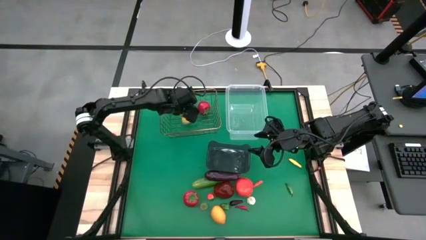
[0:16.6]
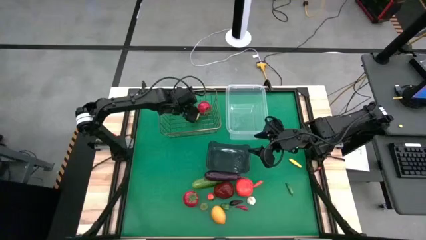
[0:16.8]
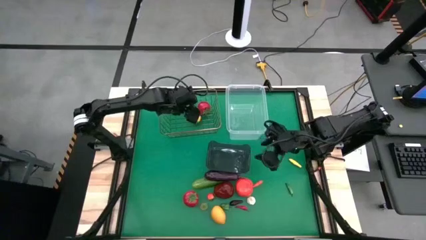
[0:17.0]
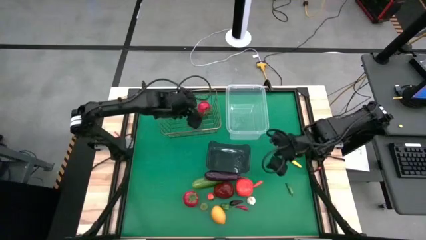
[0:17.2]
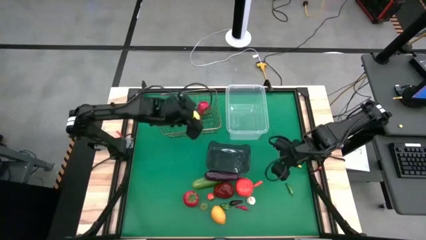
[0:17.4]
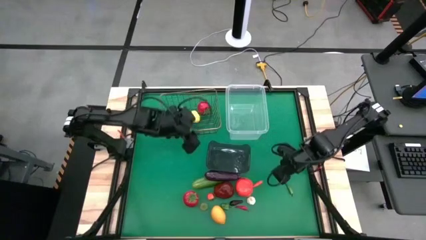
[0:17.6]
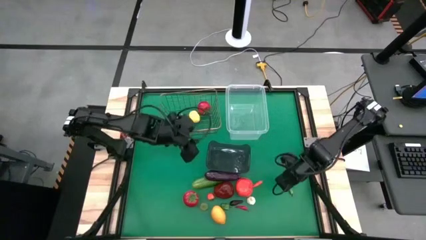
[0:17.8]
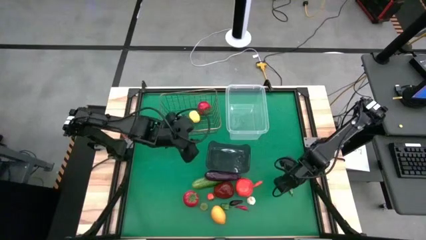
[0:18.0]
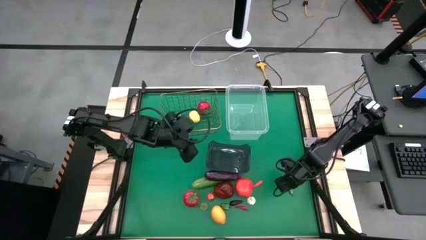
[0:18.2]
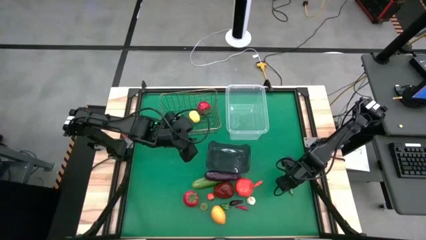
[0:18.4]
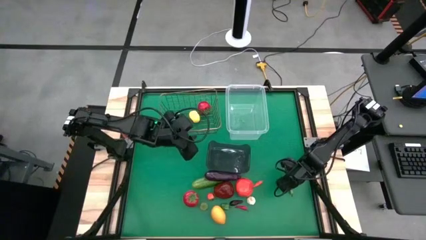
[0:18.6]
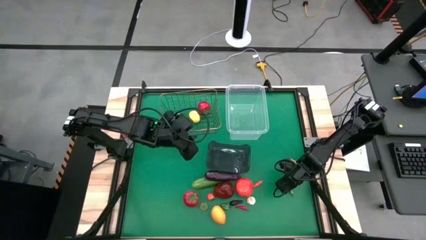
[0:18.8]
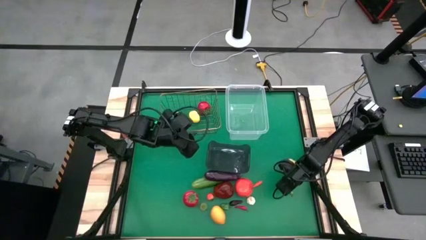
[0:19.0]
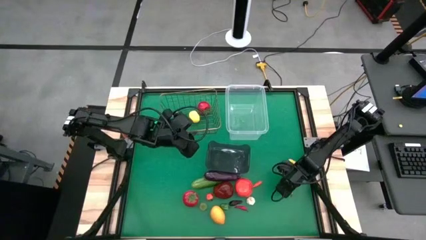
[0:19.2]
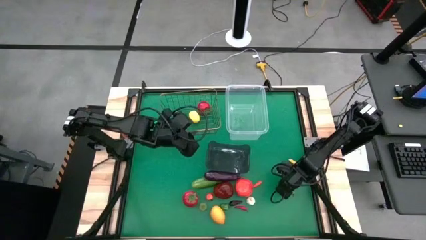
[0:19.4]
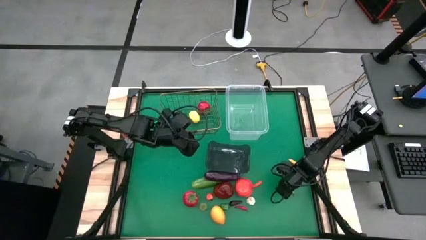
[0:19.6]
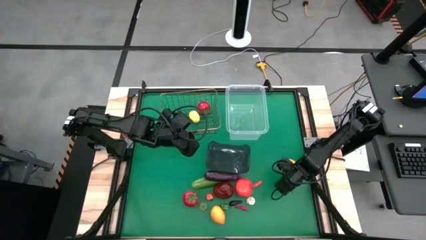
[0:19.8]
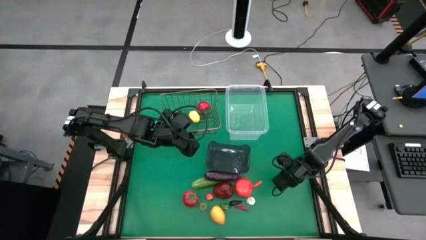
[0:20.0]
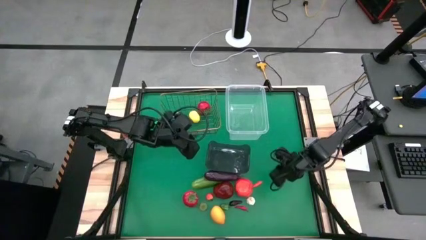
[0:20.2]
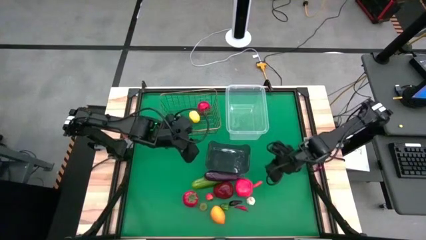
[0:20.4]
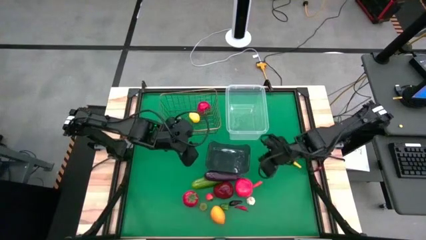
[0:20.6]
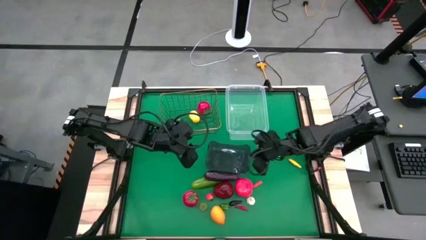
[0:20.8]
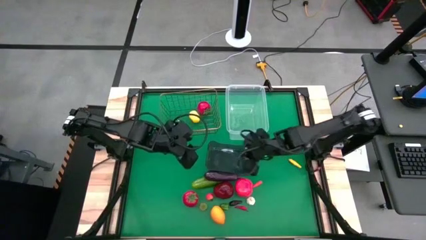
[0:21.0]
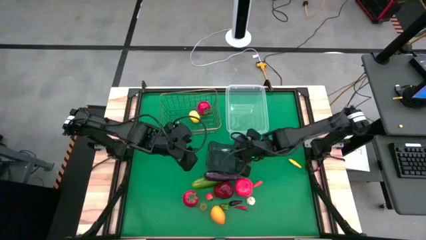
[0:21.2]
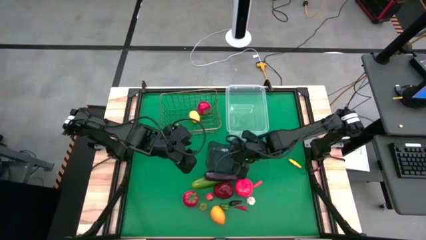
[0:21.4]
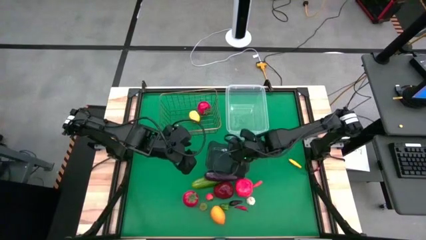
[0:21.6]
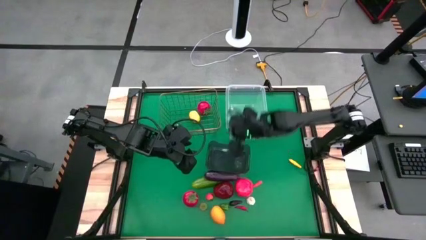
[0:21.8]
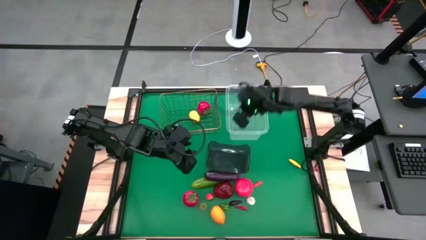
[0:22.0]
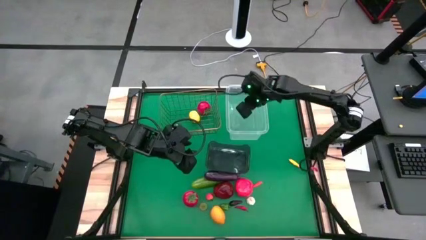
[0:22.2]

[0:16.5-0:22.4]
Task: Sort produce into baskets
Put the green chili pepper into the transparent bin

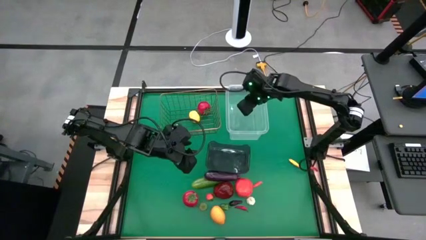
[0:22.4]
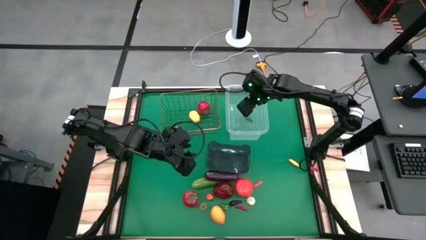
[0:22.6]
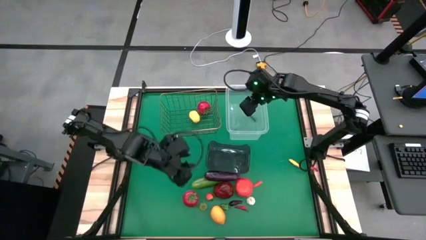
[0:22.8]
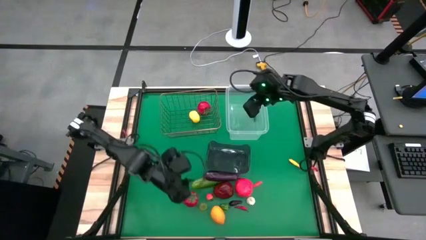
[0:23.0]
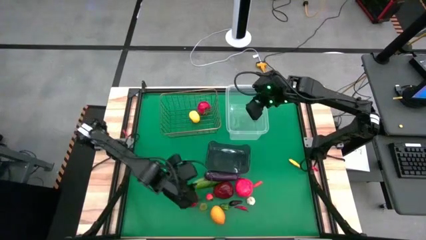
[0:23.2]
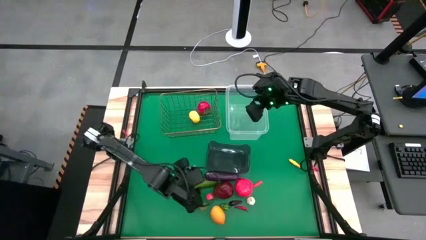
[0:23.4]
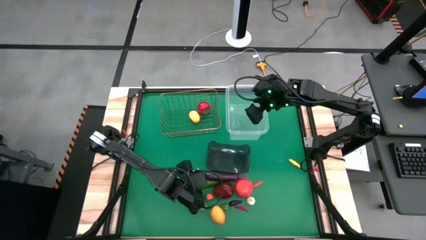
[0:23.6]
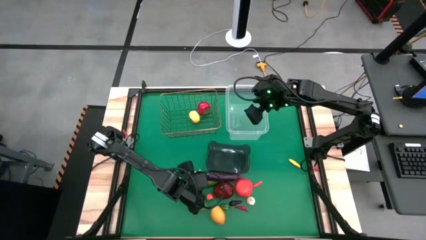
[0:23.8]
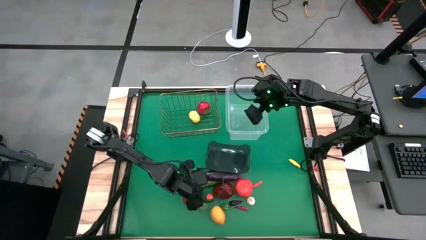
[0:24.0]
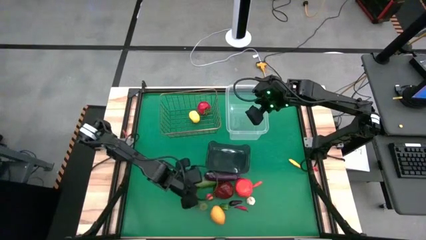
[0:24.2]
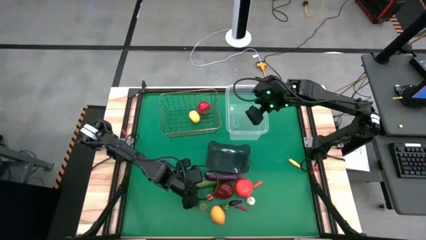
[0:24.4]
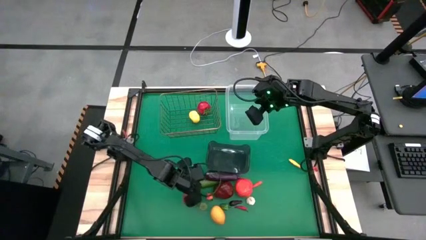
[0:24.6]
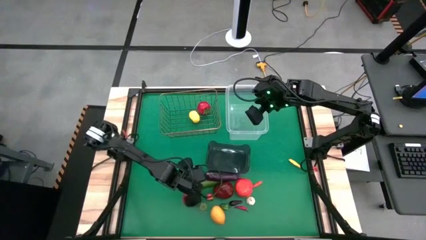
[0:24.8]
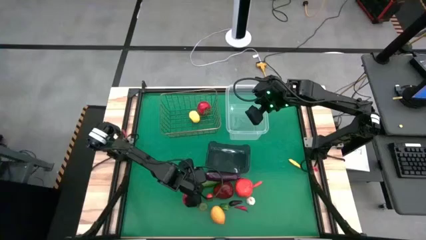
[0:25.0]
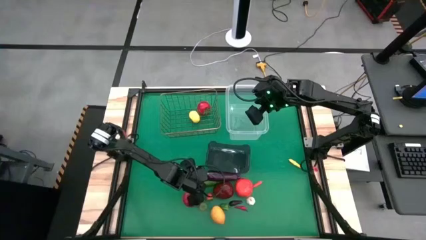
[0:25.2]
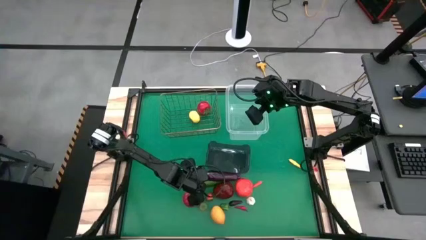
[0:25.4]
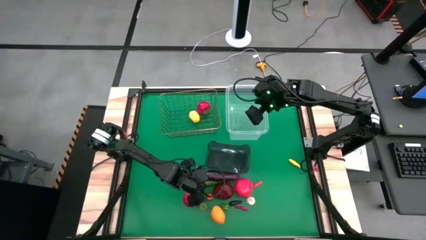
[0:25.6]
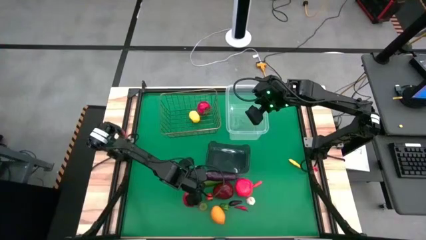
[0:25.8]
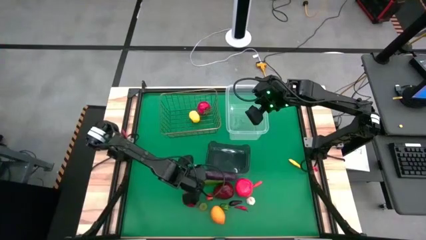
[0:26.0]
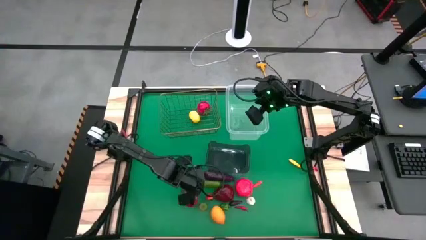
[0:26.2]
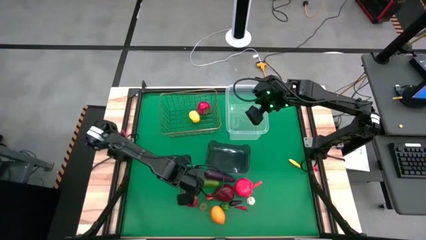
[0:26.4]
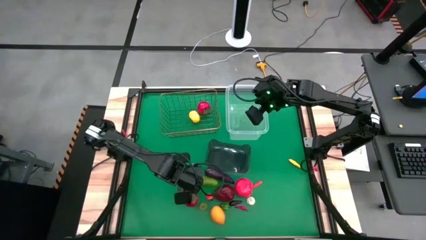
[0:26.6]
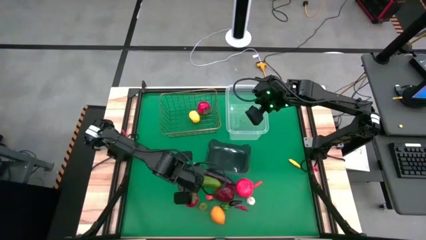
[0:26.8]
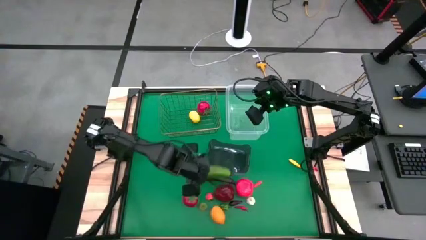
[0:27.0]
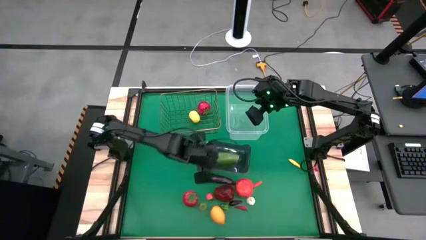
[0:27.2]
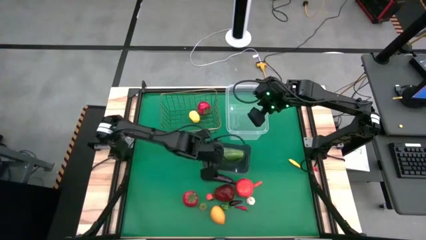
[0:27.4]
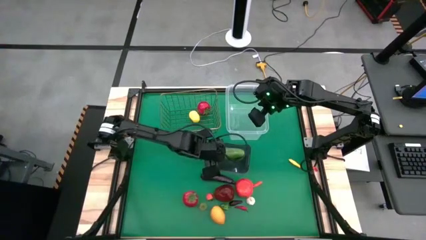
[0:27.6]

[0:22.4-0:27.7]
Put the cucumber into the black bin

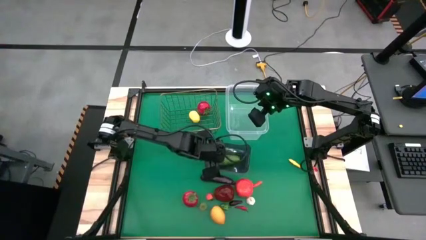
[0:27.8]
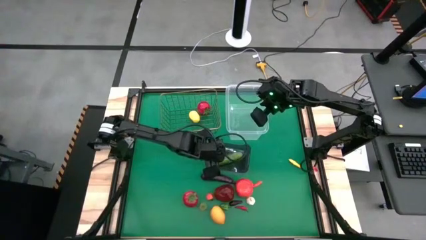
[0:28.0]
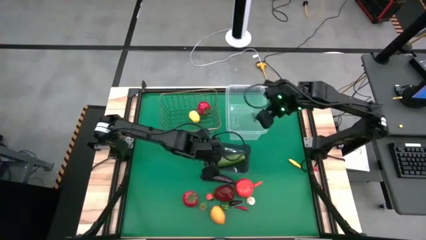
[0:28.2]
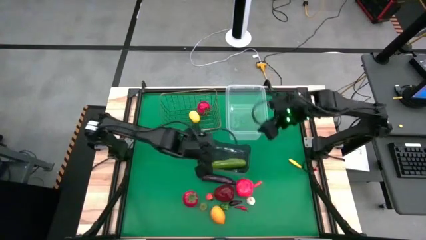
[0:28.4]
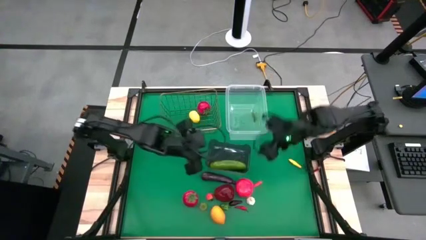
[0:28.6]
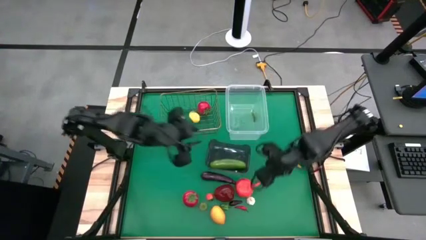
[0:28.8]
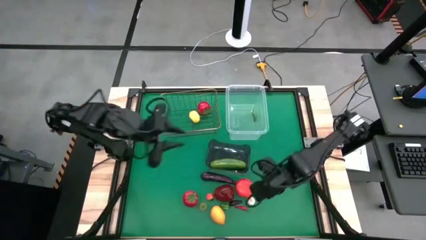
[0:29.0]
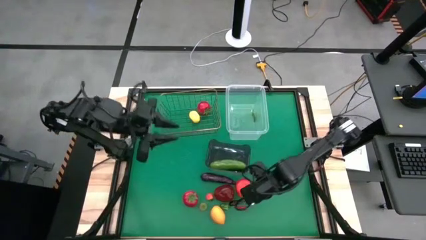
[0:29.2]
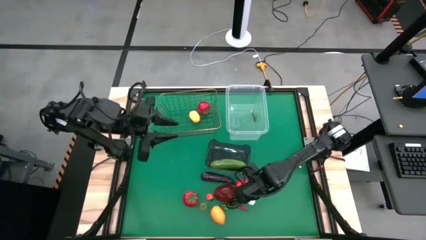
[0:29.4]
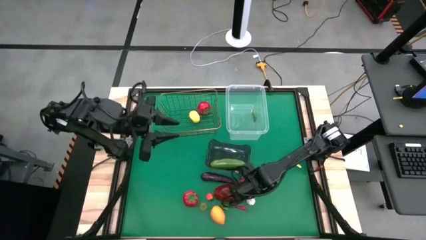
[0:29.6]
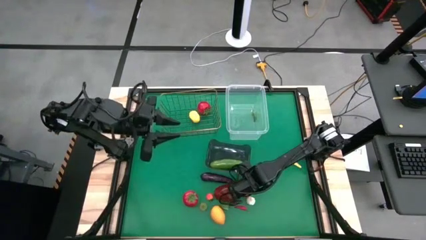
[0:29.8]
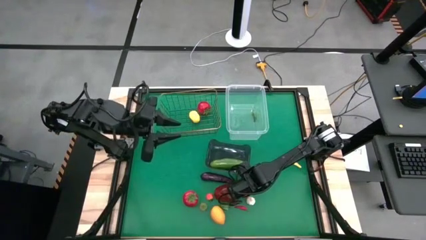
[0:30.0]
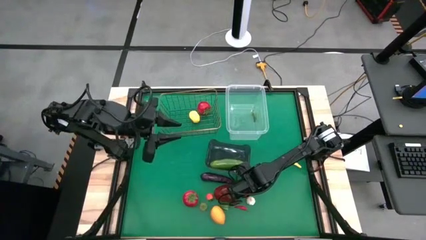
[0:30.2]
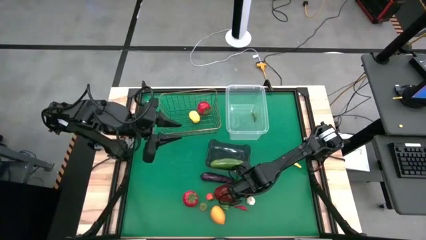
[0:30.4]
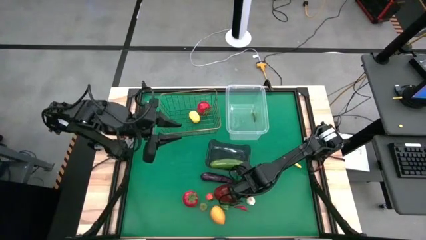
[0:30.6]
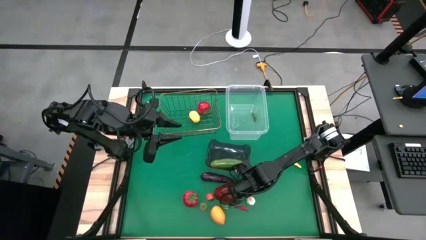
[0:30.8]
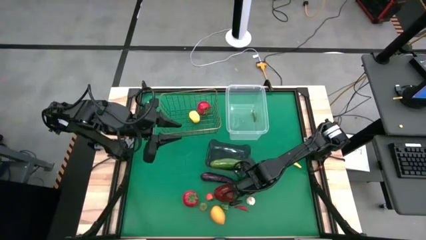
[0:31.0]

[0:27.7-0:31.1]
Put the apple into the wire basket

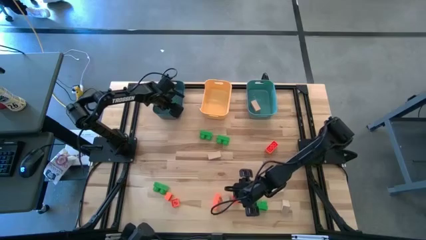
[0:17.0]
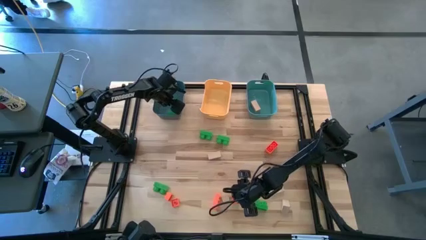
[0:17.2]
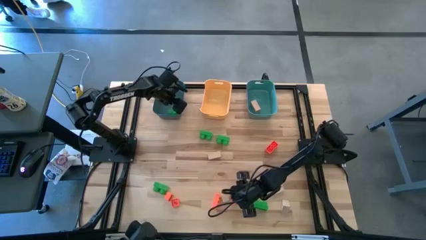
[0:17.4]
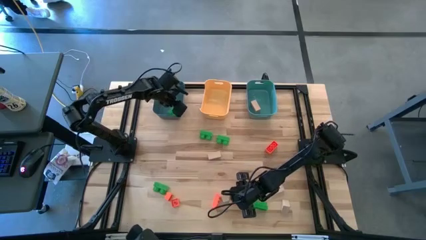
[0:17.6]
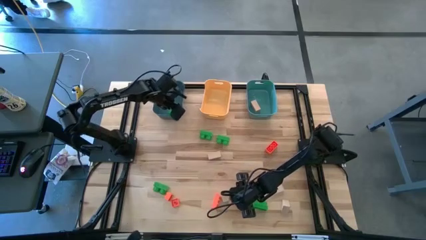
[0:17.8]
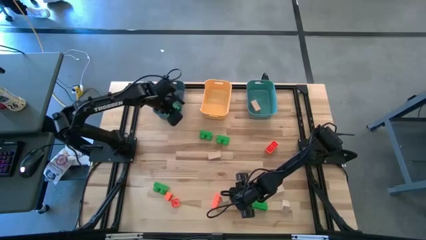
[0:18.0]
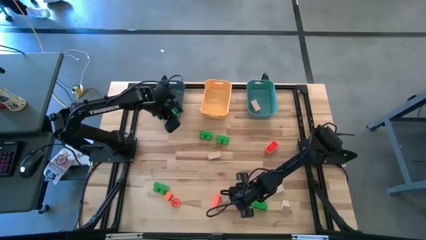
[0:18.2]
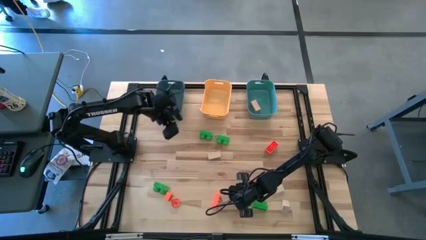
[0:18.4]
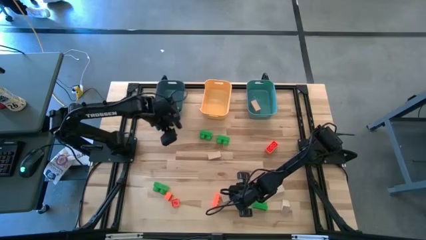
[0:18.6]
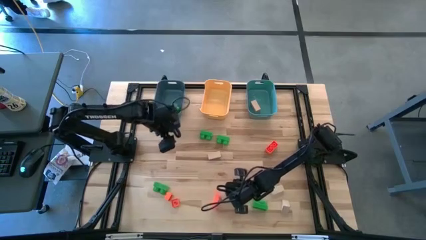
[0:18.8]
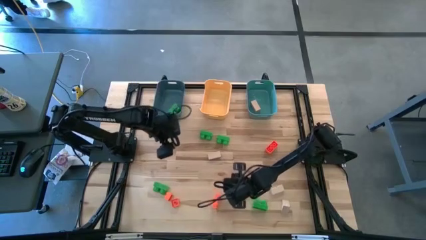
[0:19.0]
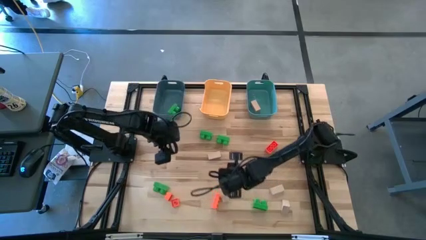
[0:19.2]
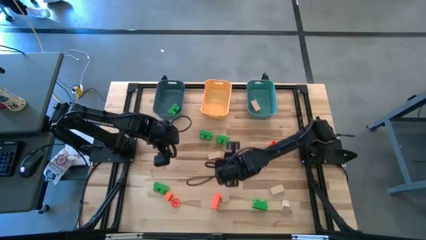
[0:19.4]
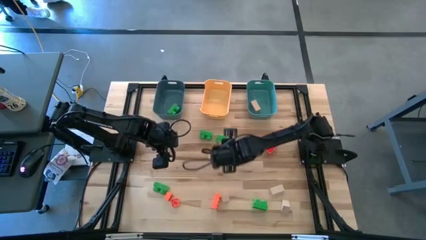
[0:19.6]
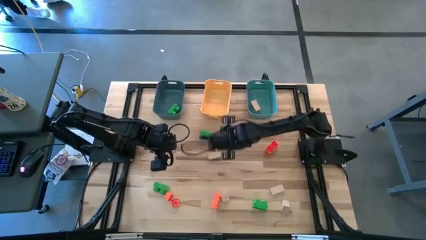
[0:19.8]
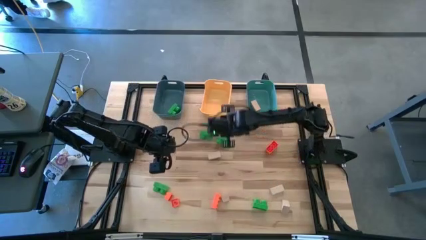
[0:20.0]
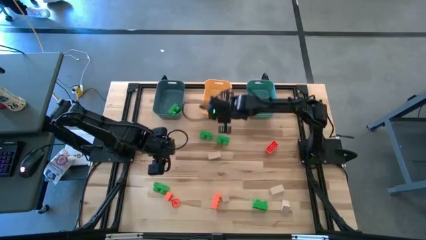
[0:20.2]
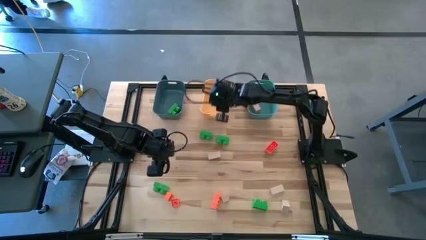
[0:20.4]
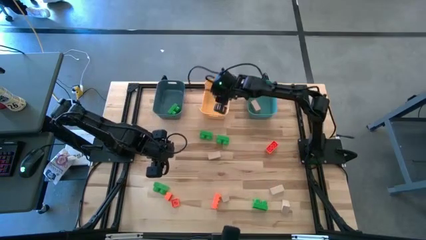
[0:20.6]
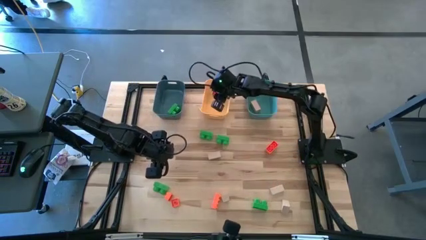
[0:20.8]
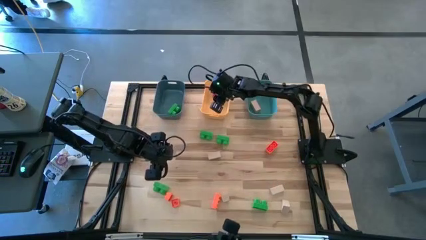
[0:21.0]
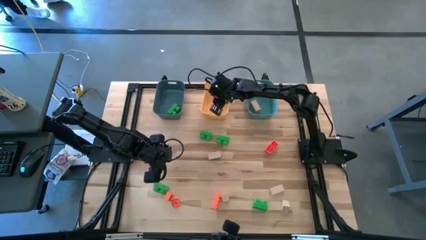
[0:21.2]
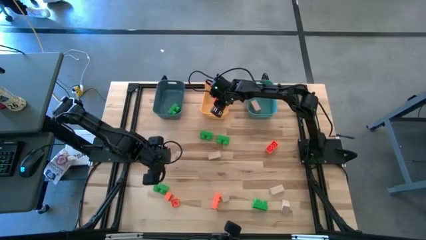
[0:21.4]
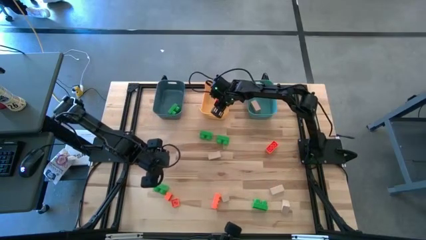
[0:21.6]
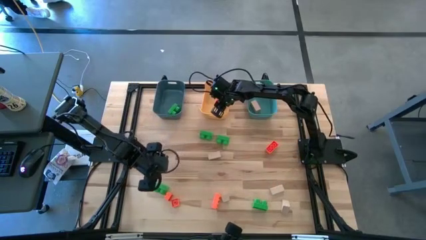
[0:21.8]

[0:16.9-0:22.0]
Task: Sort & place blocks by color
Put the orange game piece into the yellow bin
